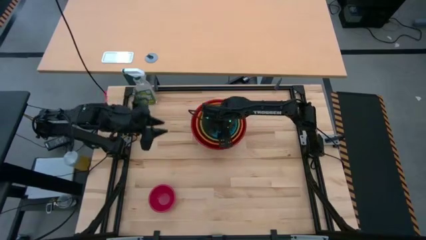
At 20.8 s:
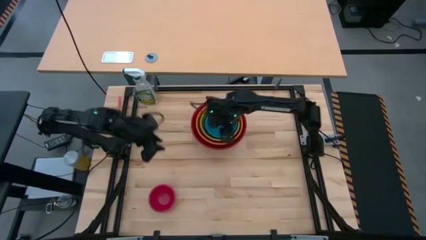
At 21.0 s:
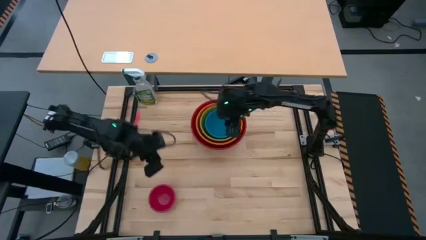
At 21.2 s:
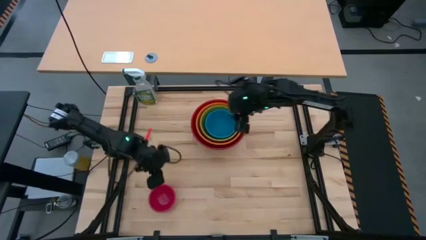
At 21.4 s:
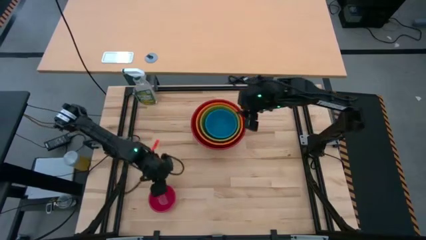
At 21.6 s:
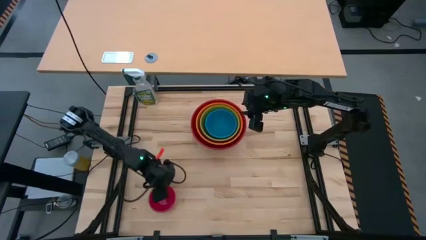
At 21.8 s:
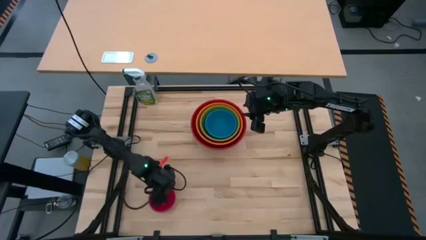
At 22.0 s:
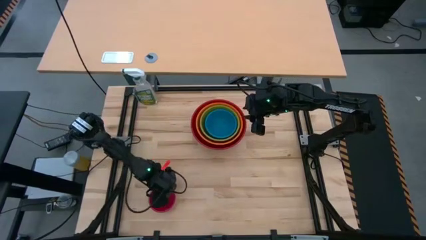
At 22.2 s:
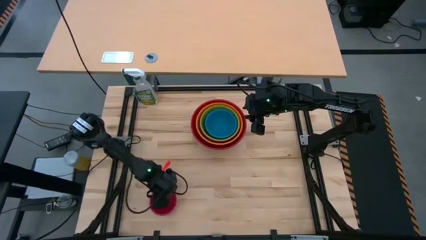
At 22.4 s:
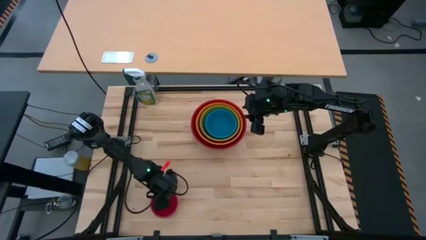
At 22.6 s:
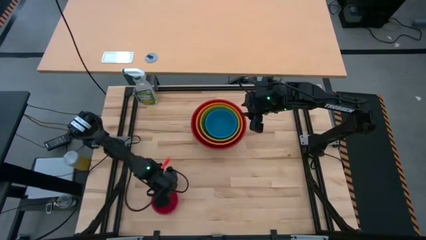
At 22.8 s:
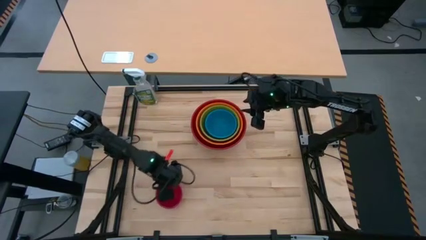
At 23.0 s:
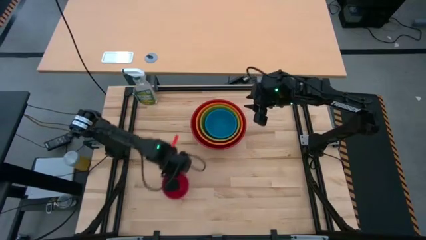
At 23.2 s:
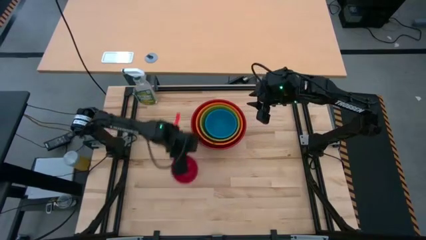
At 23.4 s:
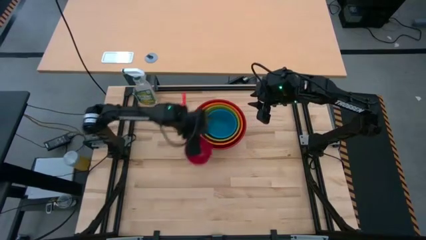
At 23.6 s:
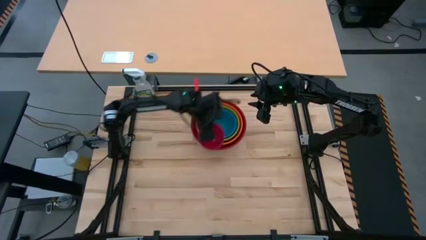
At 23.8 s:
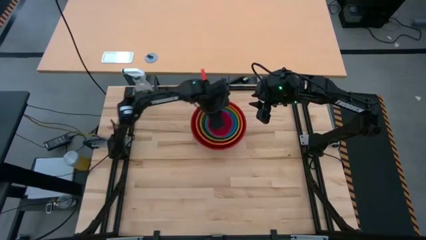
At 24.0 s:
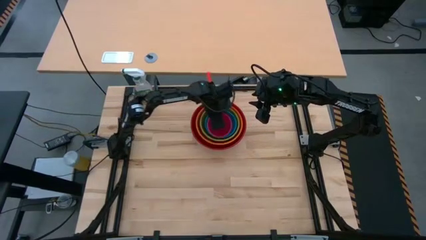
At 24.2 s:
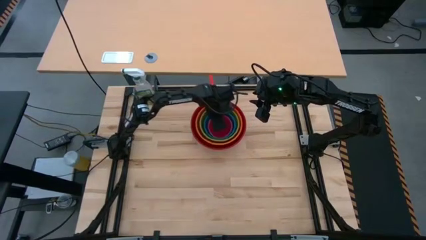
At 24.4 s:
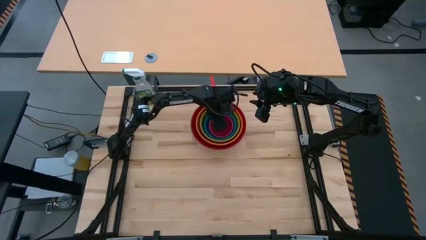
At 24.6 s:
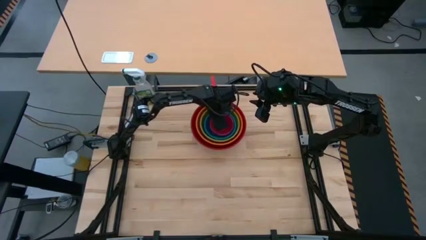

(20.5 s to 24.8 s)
Stack the pink bowl on the blue bowl

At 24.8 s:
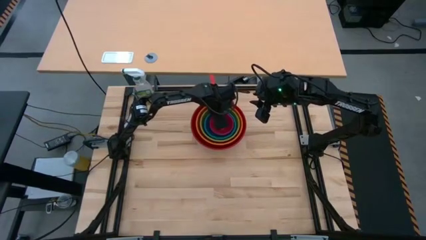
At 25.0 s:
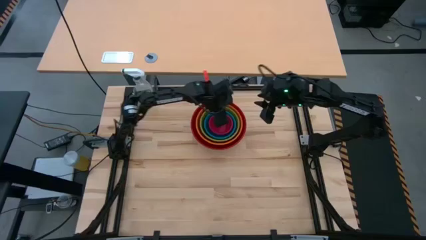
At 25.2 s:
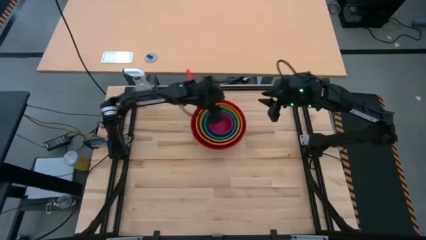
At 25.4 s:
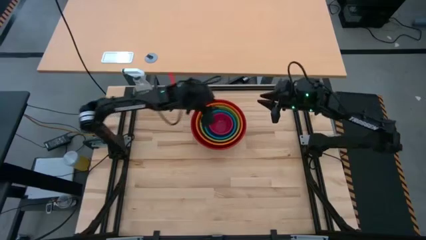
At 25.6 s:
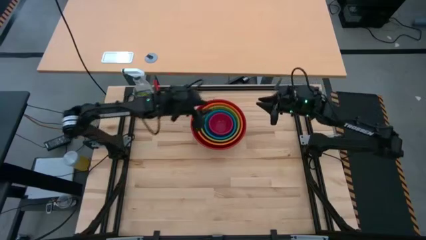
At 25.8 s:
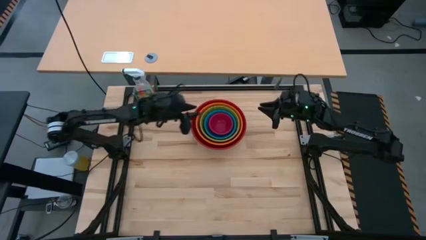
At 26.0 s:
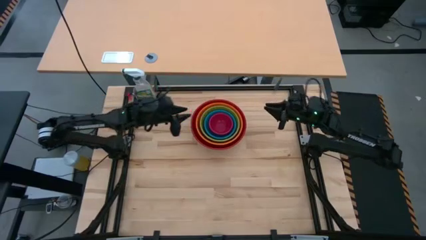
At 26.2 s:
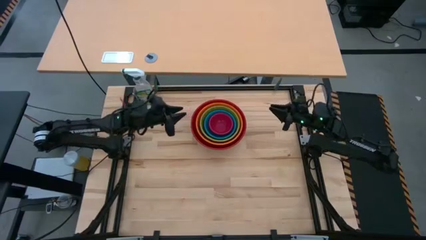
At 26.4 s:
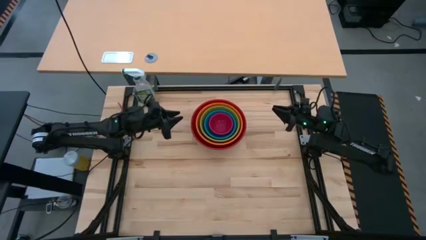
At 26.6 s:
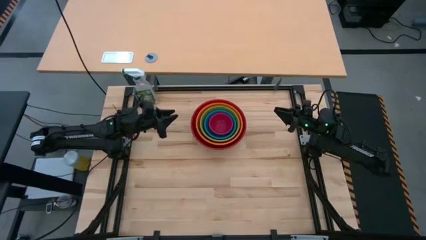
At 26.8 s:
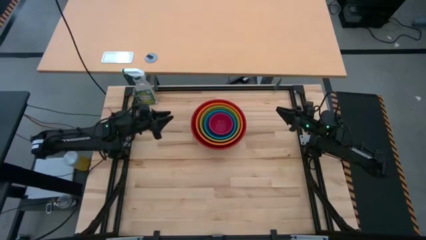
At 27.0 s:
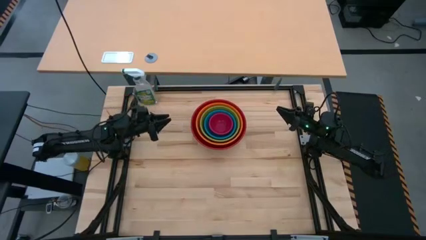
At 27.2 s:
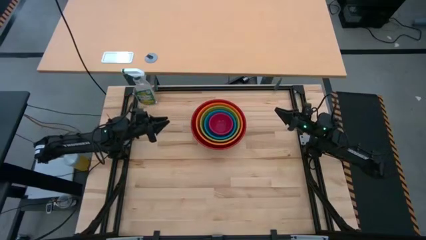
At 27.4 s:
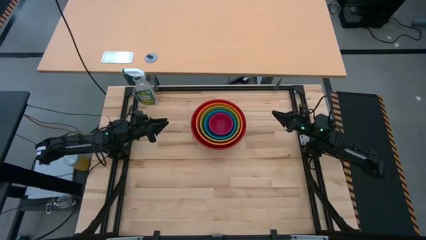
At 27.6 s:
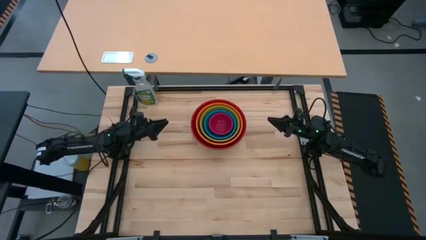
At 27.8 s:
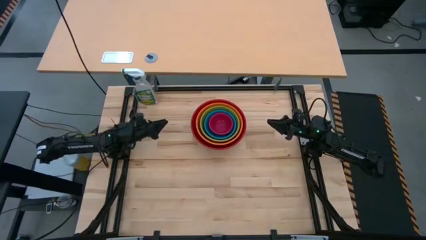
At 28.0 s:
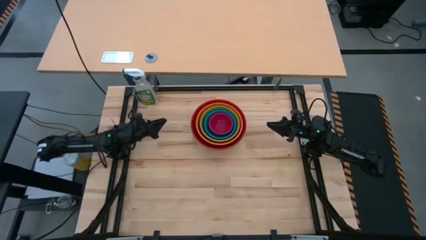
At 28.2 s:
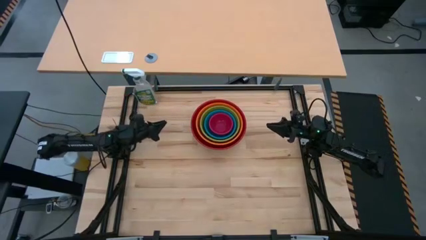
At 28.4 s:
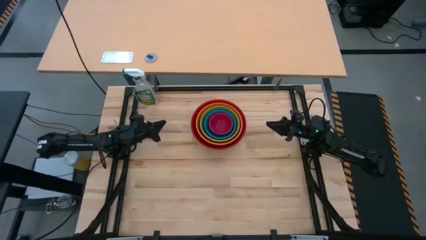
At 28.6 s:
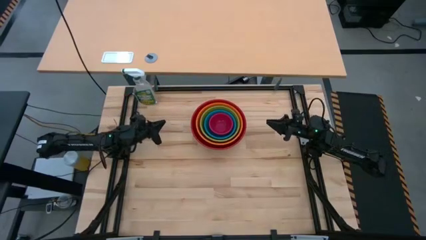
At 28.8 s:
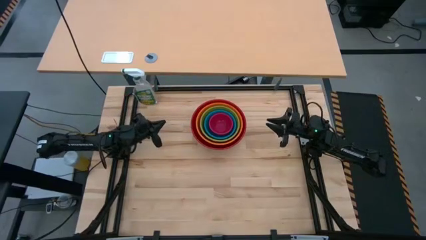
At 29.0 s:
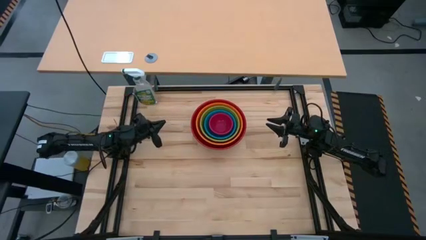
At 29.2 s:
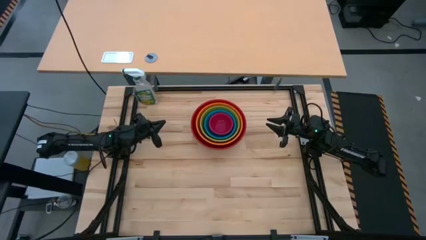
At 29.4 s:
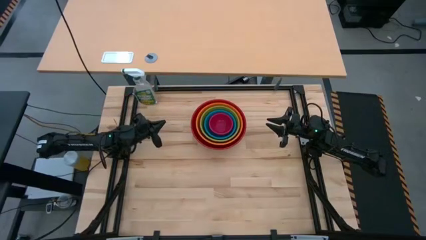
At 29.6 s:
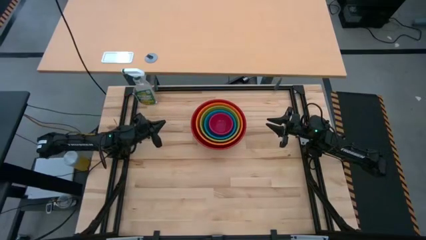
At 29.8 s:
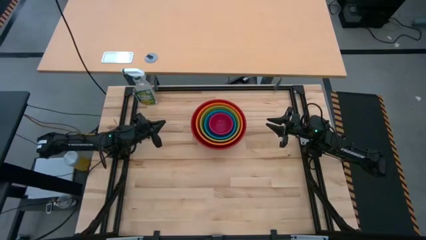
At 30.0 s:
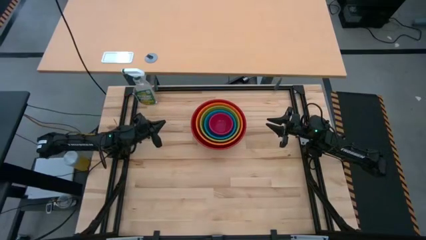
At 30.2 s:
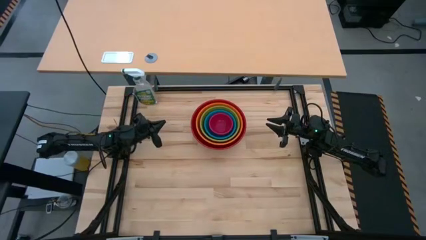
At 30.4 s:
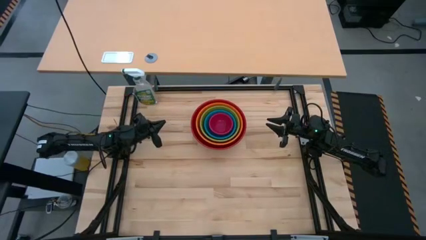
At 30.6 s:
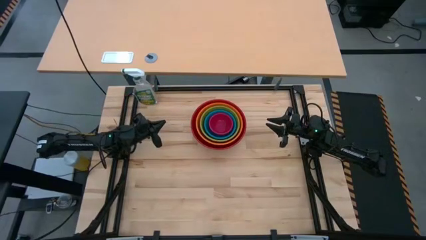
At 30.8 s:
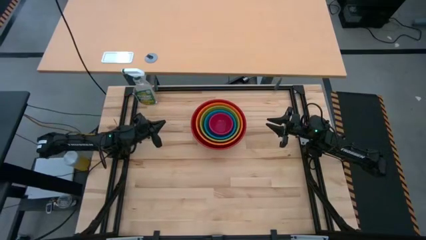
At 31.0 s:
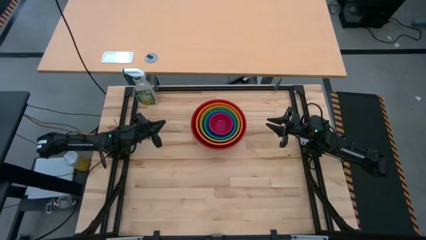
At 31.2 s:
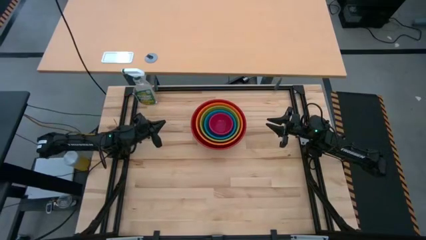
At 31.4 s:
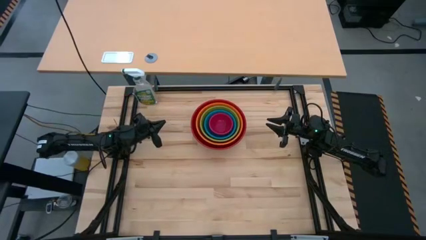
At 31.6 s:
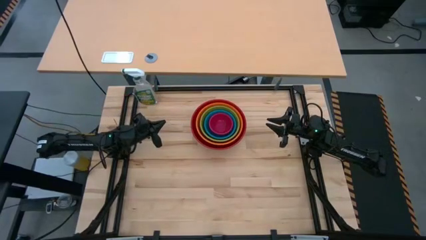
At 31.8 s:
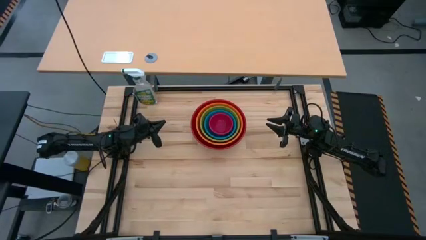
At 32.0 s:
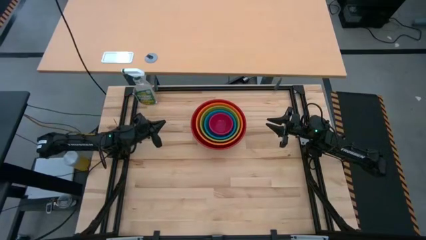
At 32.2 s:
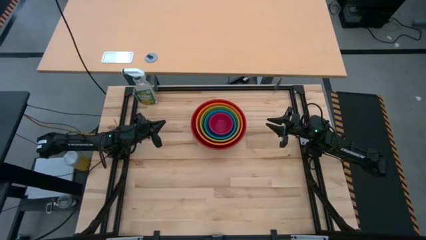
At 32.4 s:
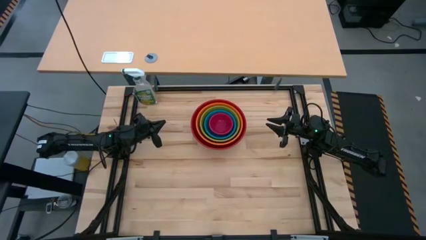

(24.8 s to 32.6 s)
Return to Home Position

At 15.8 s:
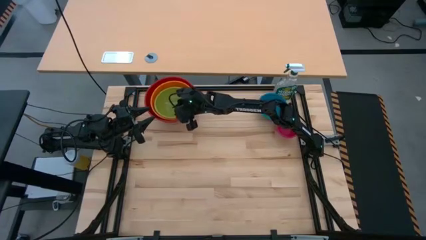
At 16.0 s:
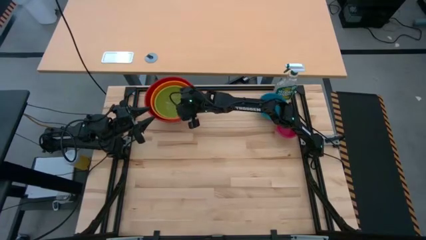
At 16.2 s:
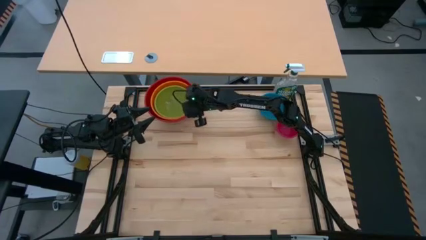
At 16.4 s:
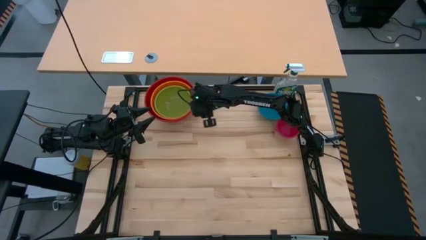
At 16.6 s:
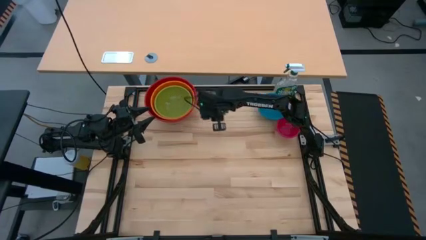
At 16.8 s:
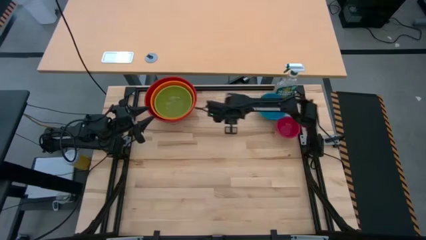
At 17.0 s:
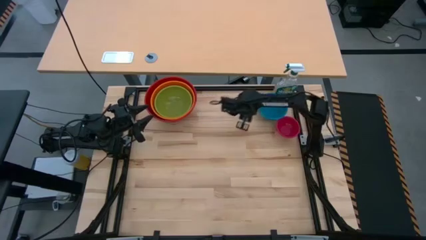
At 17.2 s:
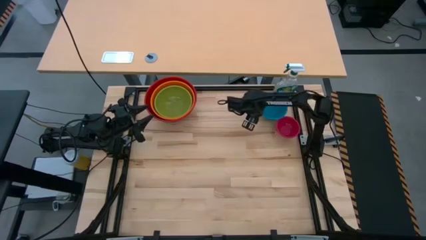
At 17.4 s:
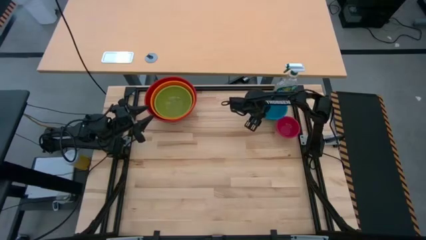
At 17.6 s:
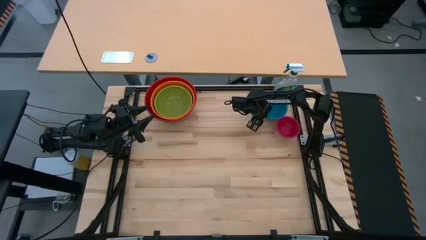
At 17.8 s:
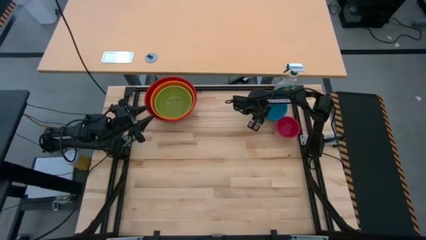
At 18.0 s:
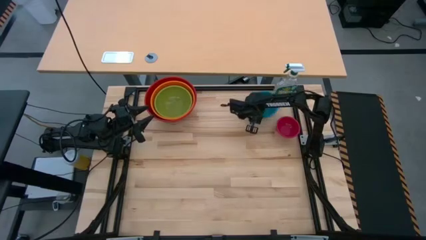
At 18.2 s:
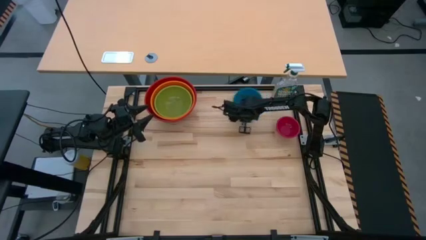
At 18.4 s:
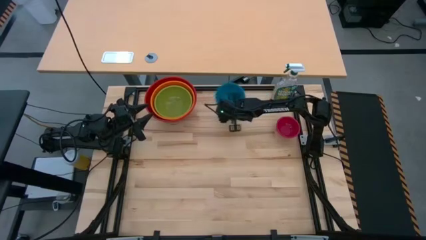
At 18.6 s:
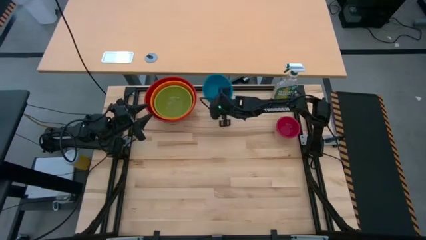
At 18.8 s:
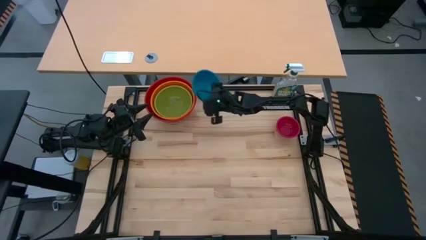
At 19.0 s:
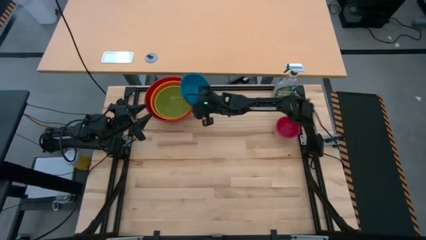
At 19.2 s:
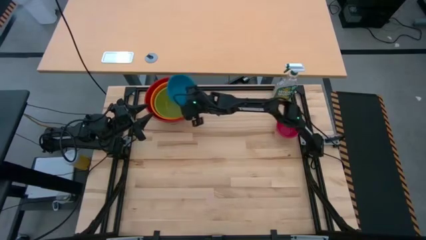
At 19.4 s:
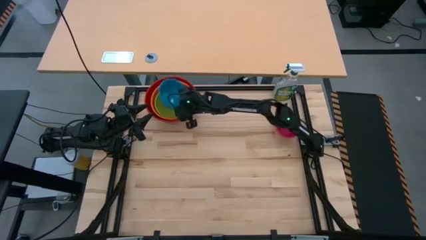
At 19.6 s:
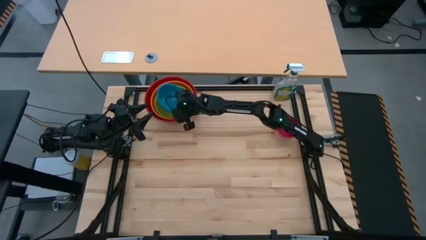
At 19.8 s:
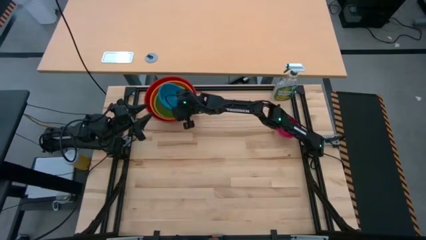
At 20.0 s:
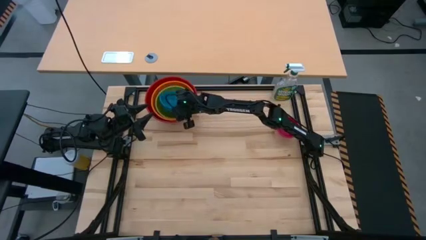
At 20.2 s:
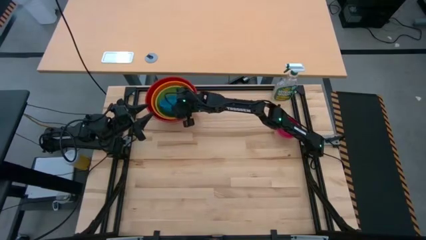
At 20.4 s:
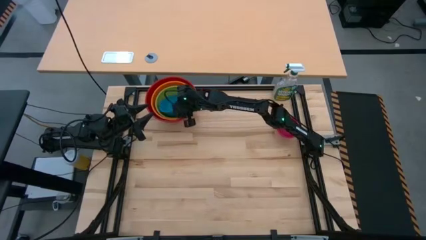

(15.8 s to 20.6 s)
Stack the blue bowl on top of the green bowl
